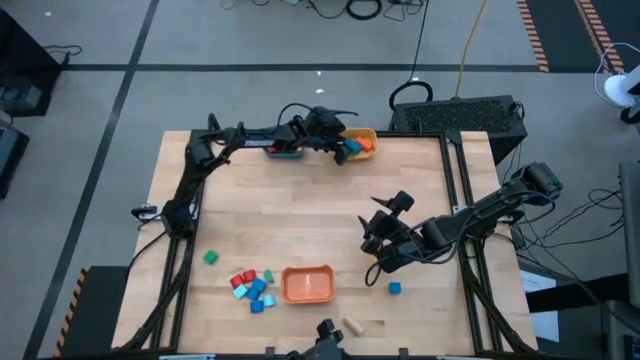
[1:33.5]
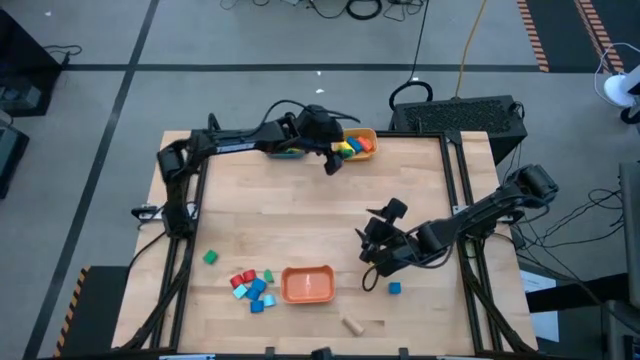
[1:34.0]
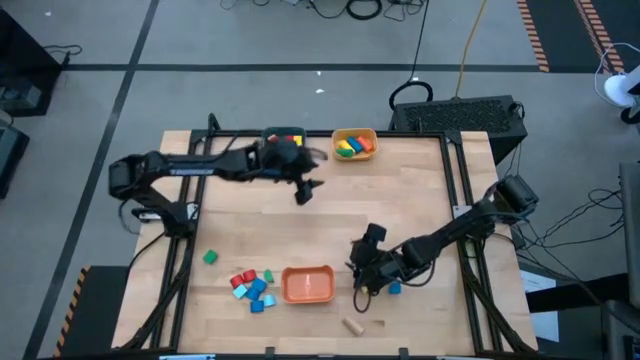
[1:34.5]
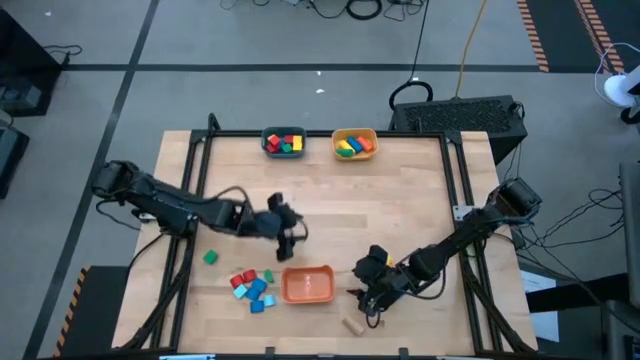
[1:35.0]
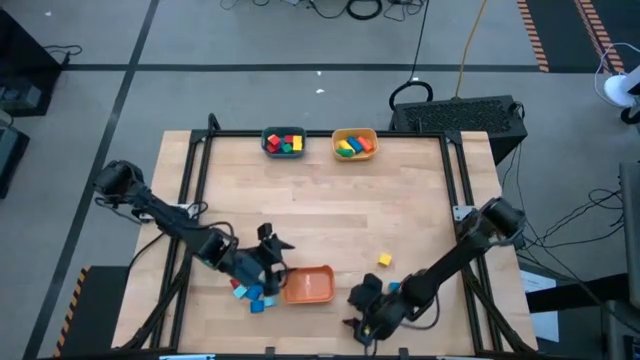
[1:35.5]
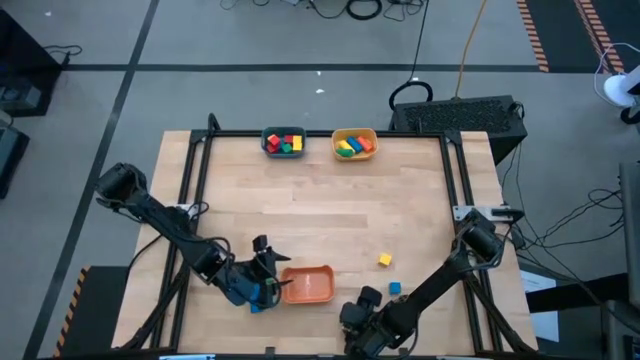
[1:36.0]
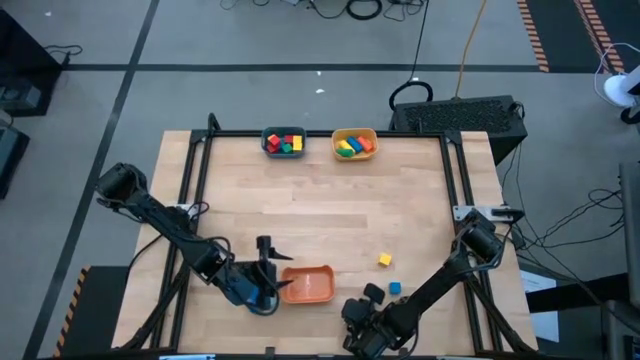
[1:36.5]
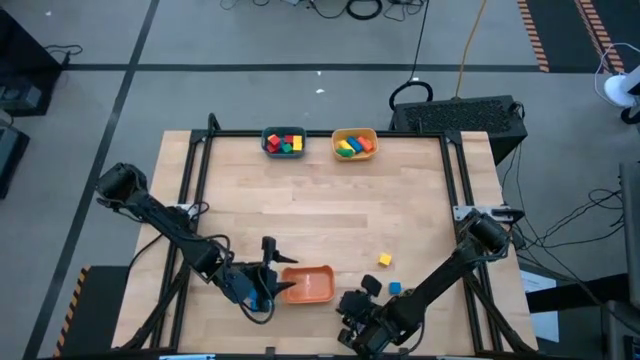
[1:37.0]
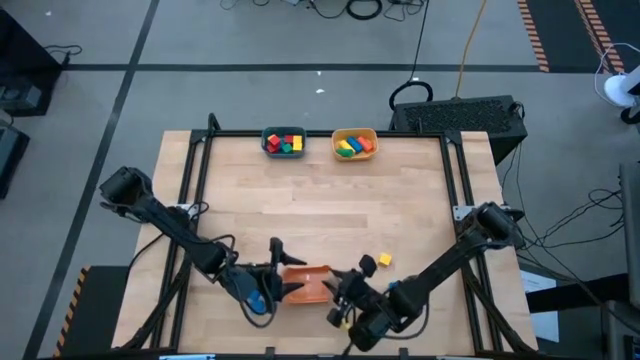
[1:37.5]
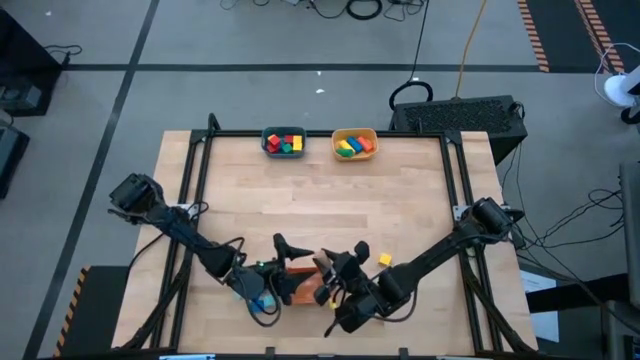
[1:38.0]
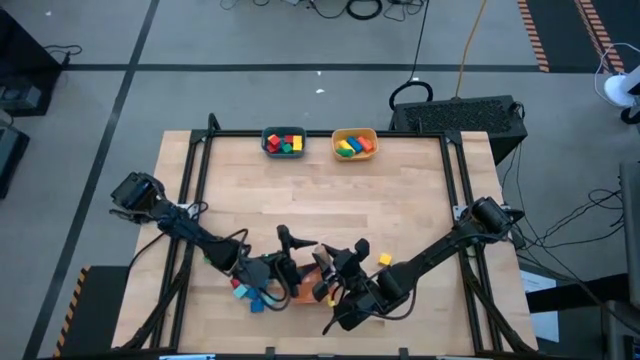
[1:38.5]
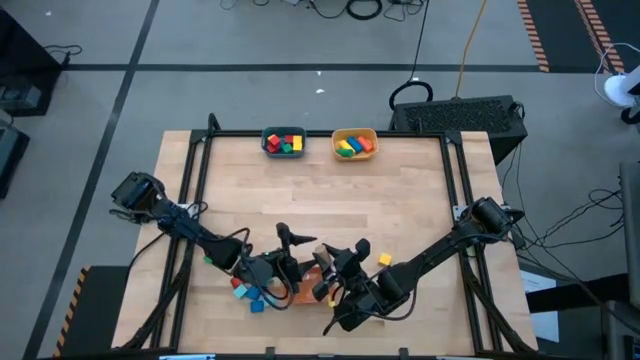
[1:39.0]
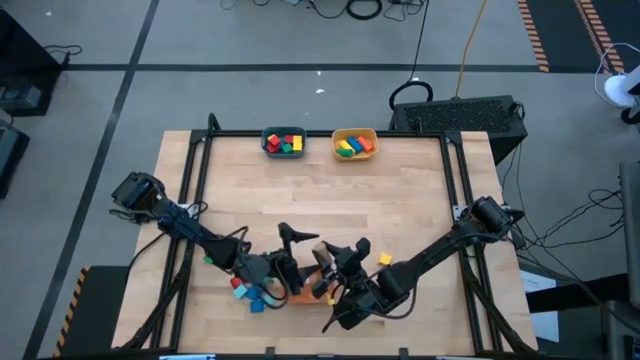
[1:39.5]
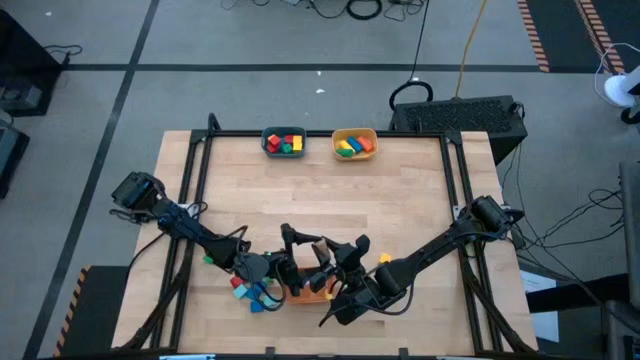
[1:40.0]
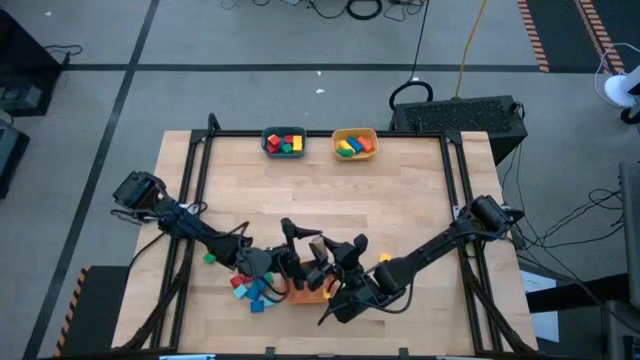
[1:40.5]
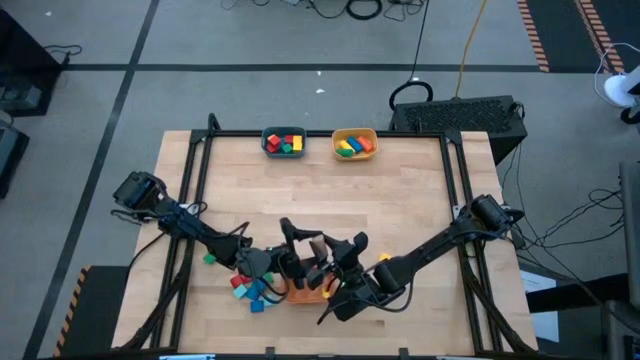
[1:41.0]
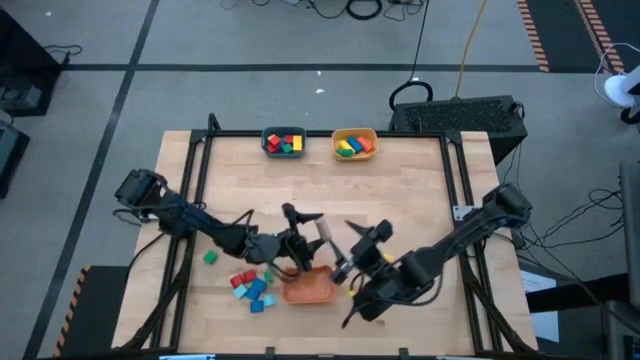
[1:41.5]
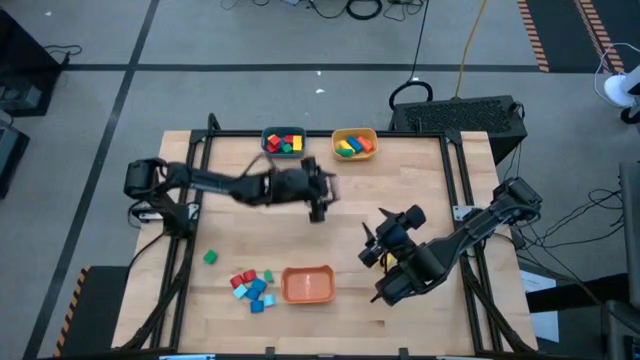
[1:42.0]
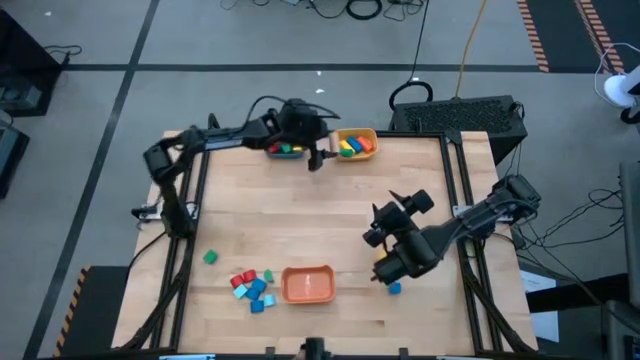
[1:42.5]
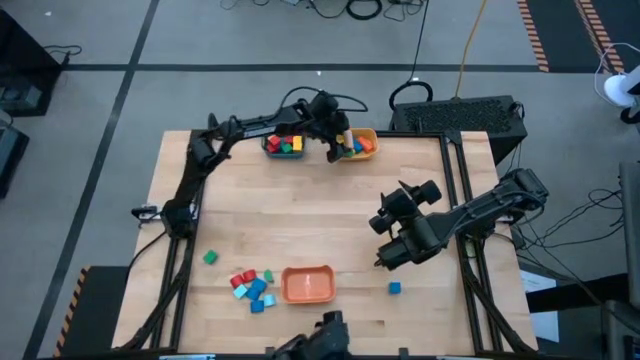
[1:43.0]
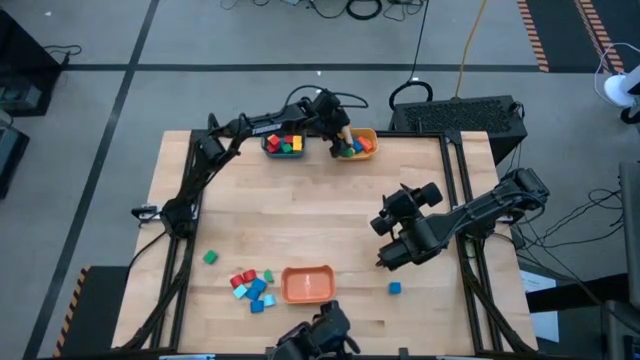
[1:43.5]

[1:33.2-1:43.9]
Task: Sort blocks by size
Put the brown cylindrical block into the yellow bin

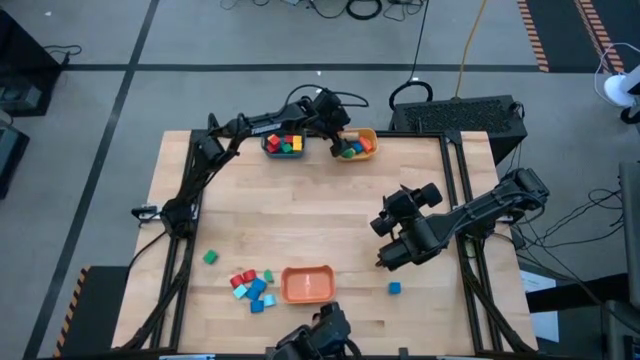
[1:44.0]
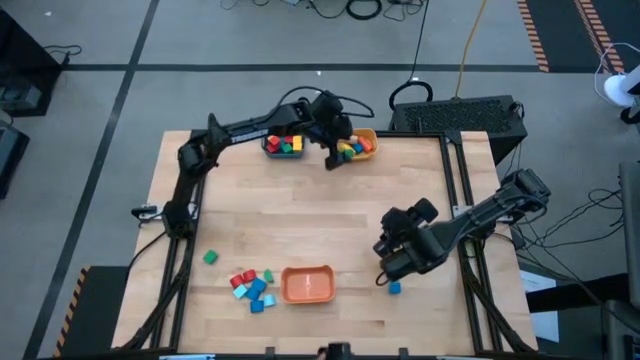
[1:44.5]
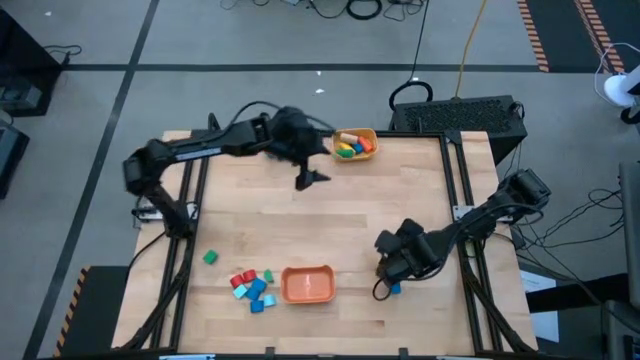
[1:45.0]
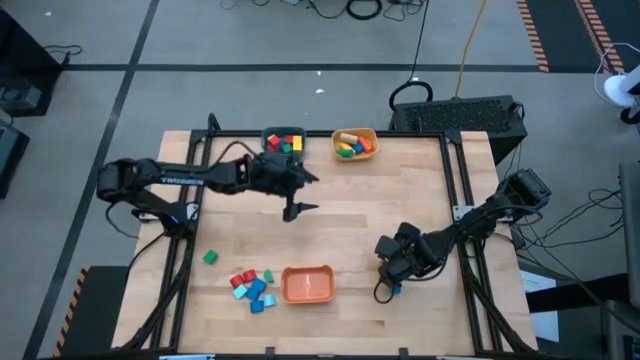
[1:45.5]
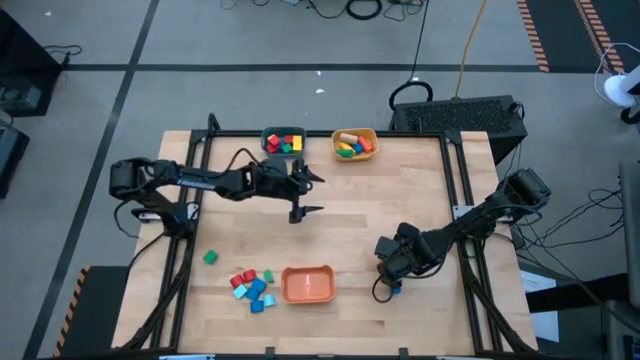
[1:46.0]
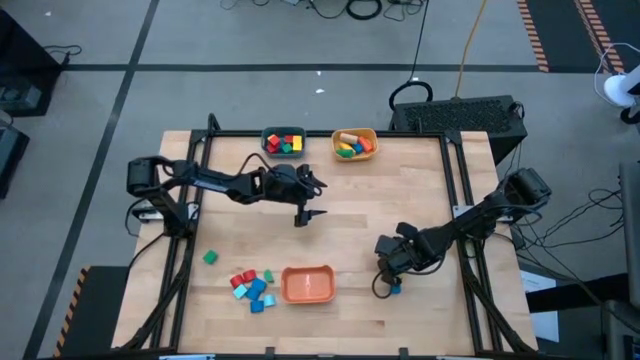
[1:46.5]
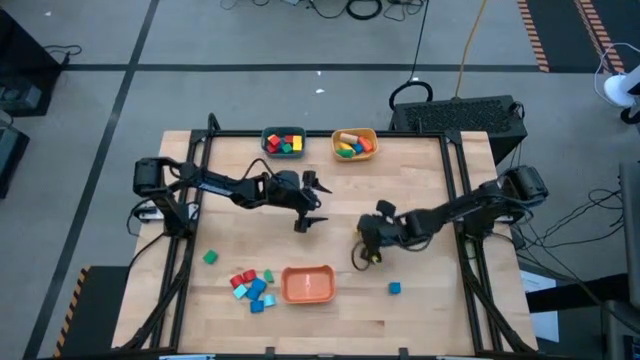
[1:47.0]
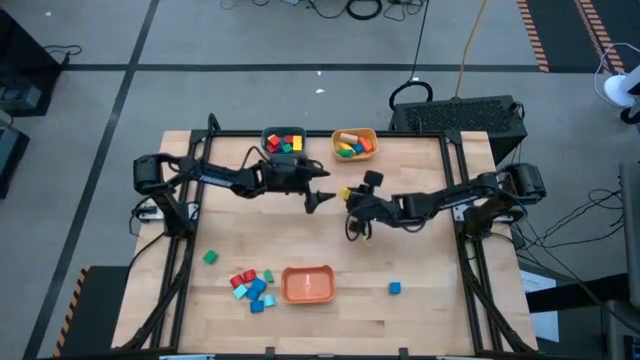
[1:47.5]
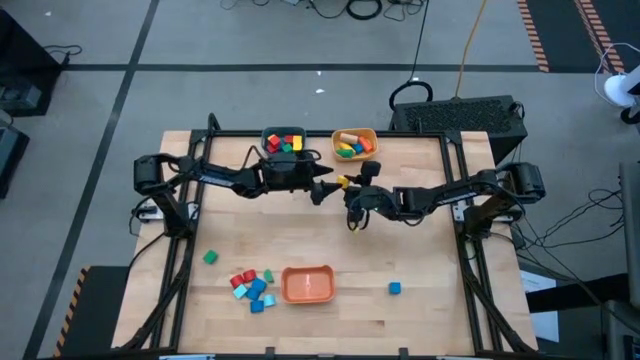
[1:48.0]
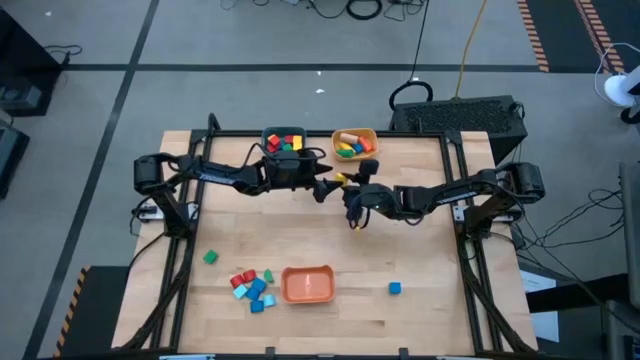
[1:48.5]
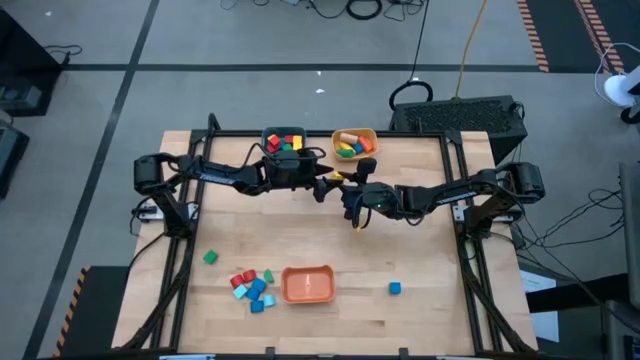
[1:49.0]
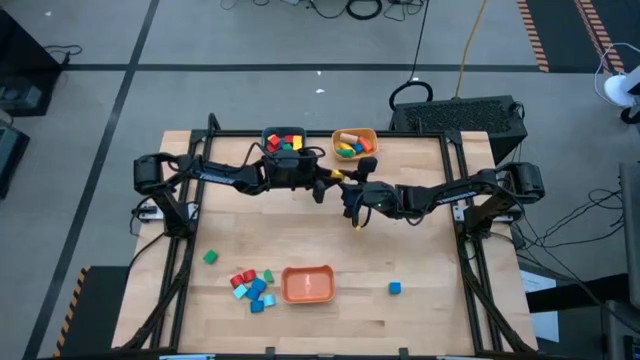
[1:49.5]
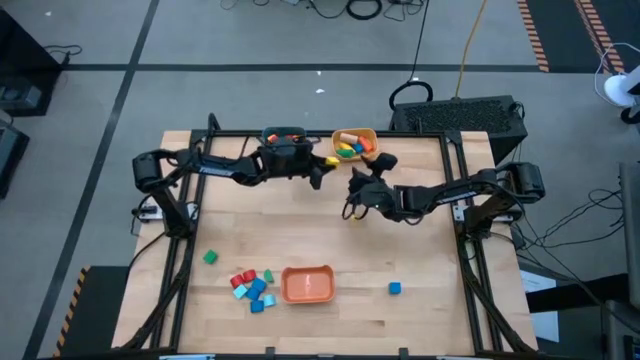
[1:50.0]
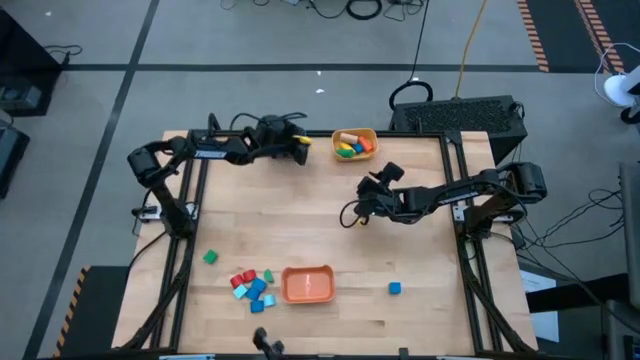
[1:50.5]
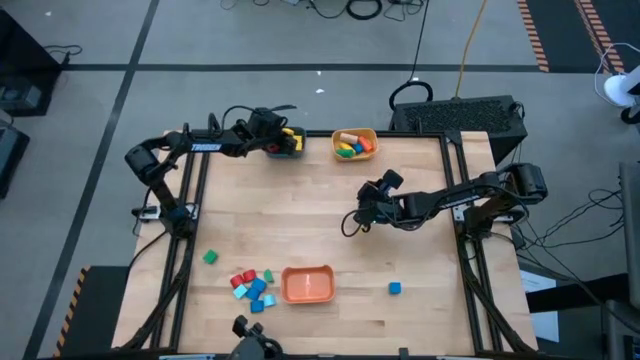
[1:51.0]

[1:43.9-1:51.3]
Put the yellow square block into the blue bin

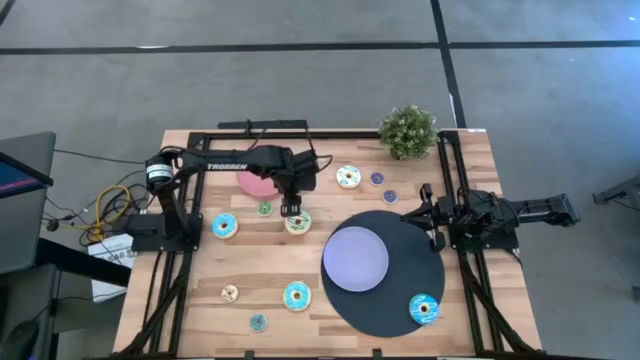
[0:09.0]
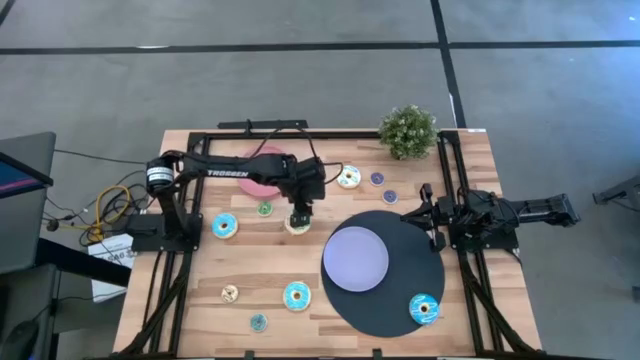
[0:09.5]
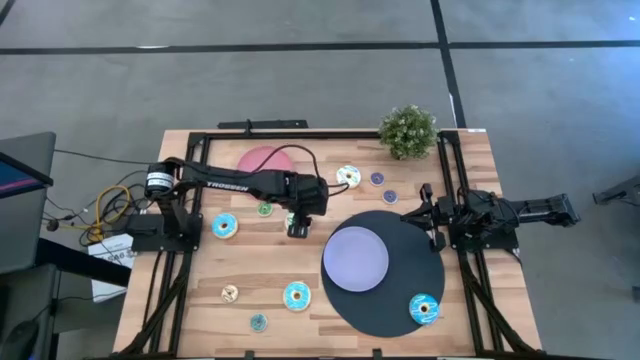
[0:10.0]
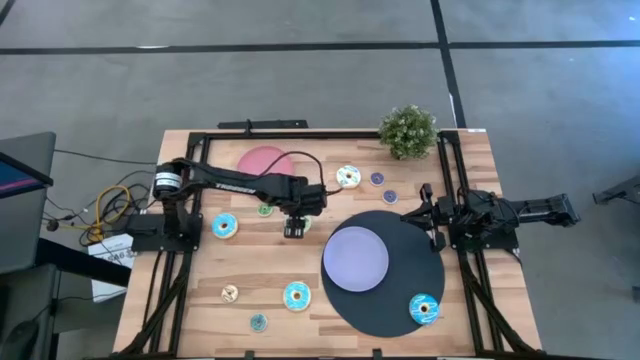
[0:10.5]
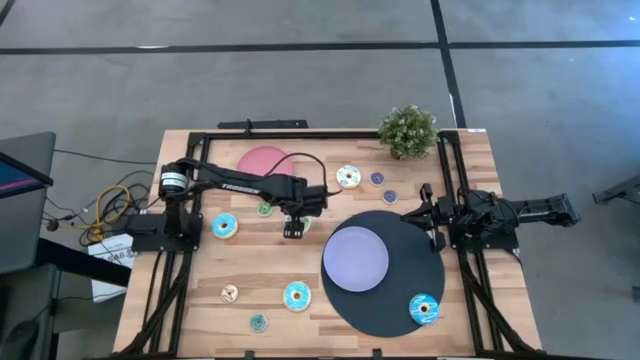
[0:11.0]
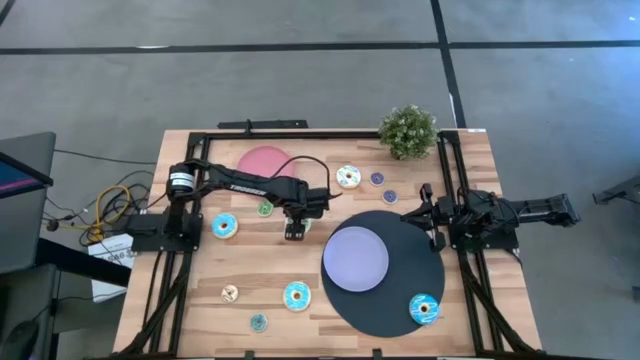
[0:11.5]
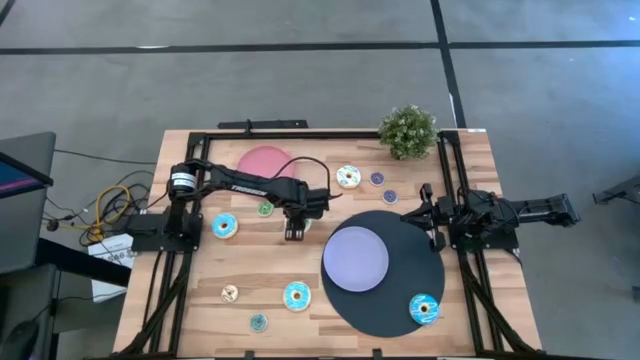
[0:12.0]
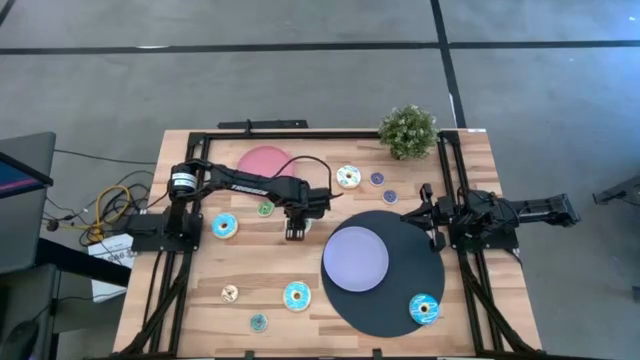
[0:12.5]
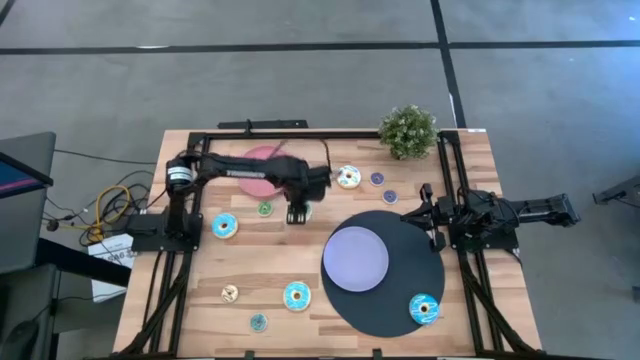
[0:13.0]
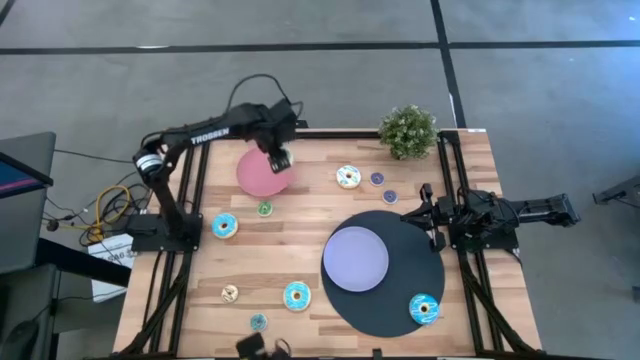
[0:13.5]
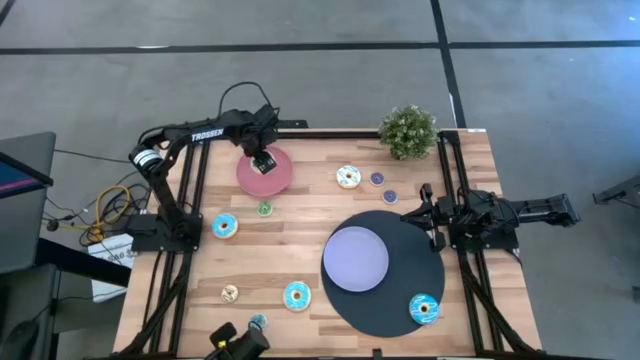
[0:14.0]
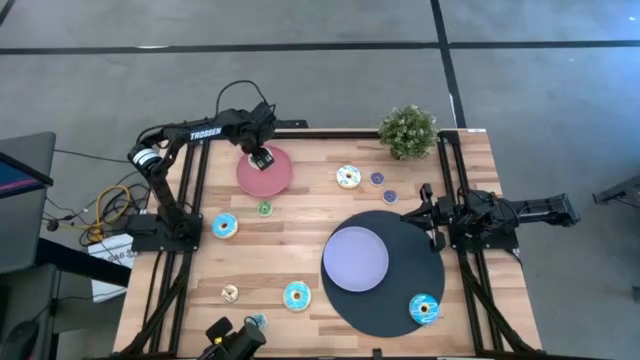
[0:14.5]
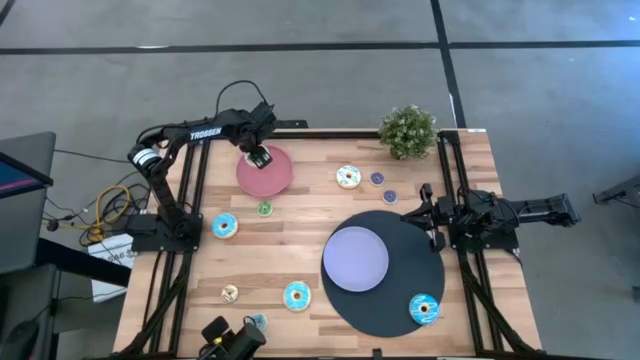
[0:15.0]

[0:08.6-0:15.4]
Task: Pick & Place donuts
Put the big green donut on the pink plate
